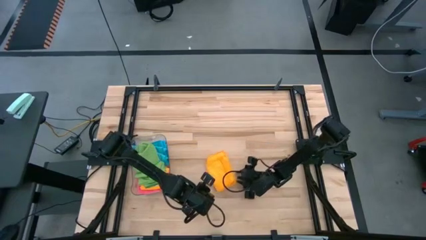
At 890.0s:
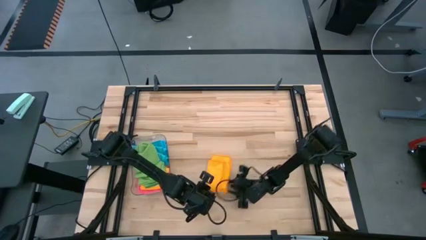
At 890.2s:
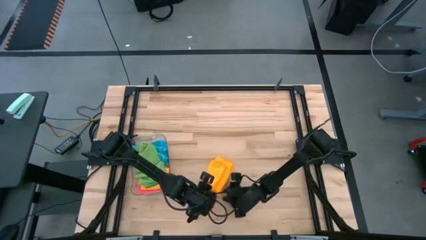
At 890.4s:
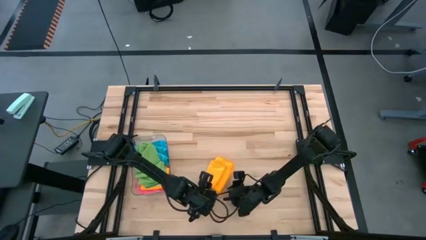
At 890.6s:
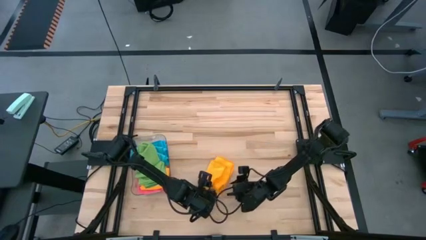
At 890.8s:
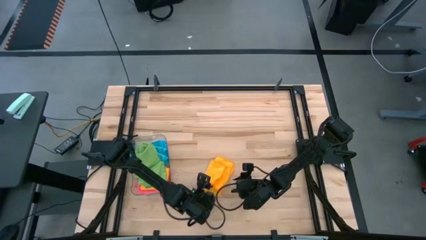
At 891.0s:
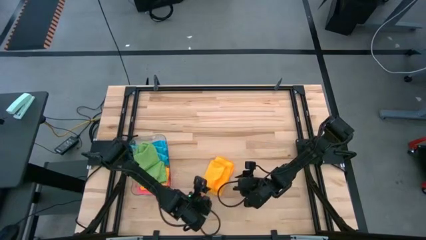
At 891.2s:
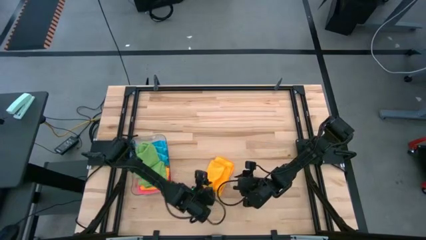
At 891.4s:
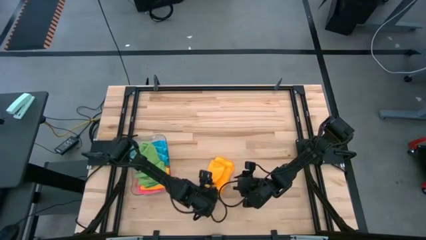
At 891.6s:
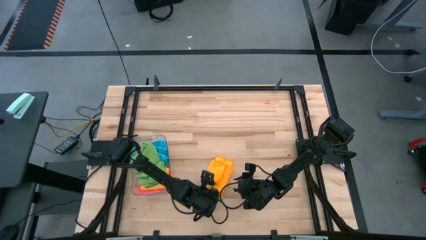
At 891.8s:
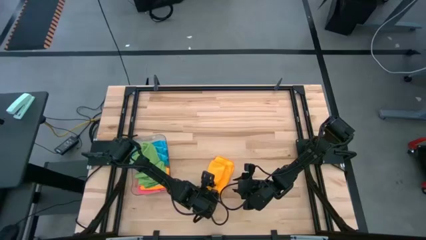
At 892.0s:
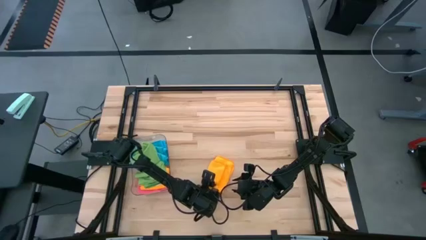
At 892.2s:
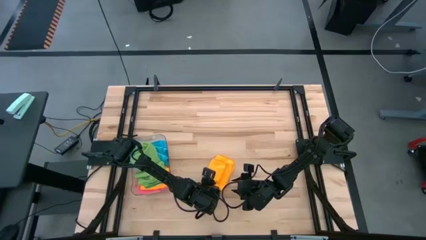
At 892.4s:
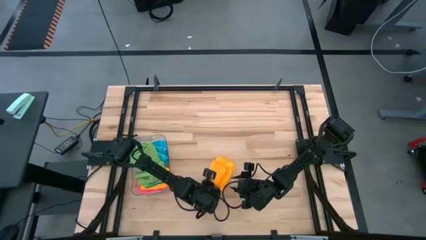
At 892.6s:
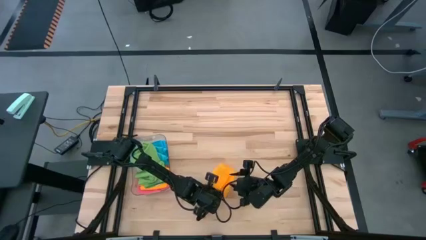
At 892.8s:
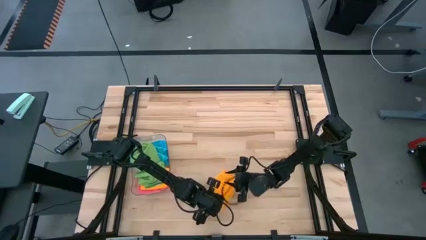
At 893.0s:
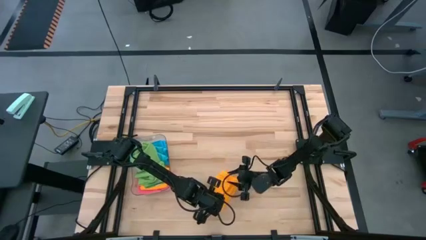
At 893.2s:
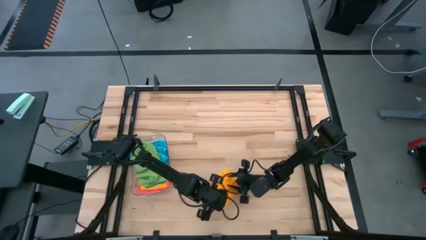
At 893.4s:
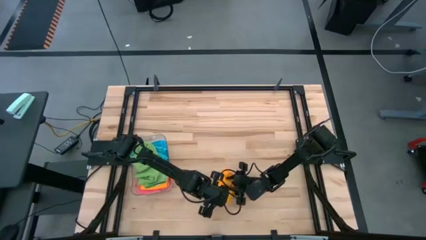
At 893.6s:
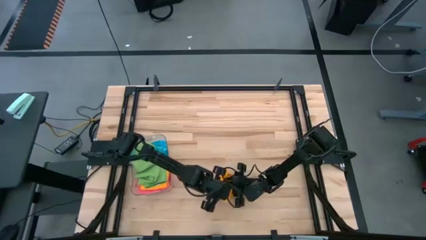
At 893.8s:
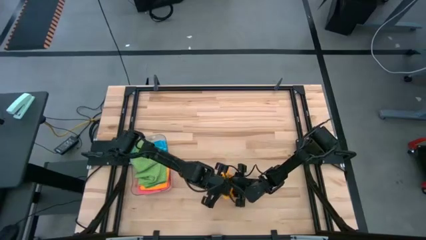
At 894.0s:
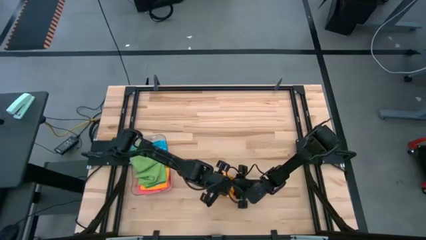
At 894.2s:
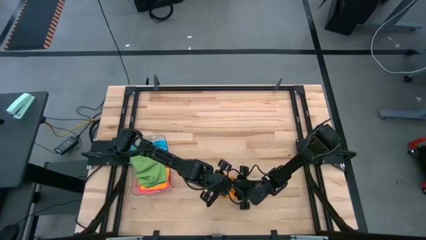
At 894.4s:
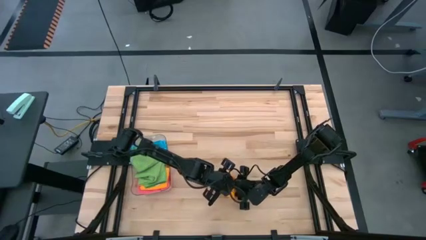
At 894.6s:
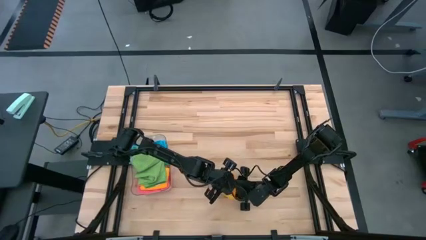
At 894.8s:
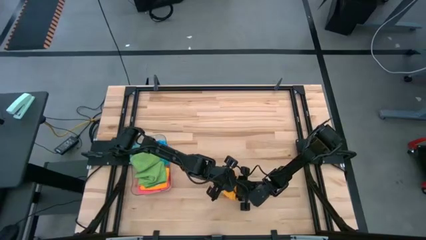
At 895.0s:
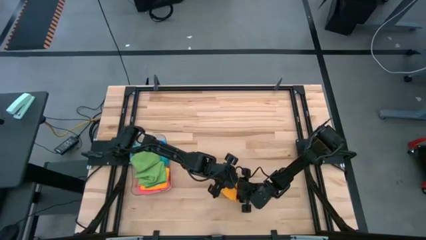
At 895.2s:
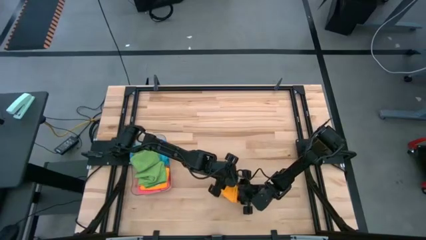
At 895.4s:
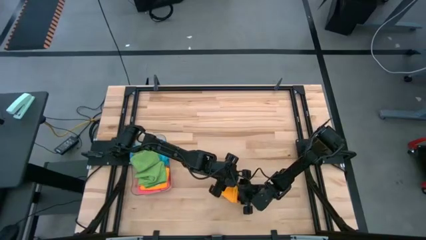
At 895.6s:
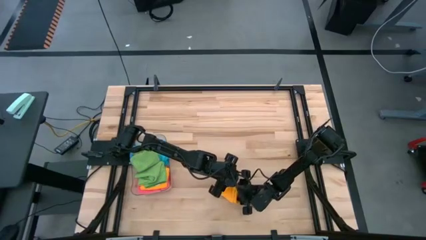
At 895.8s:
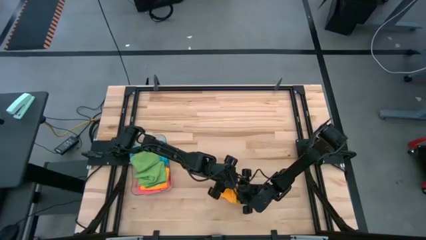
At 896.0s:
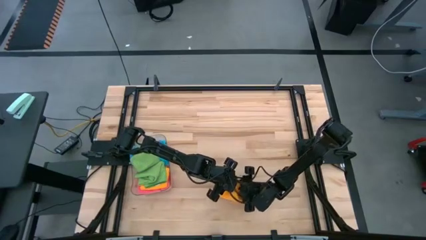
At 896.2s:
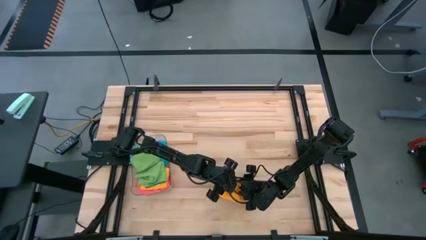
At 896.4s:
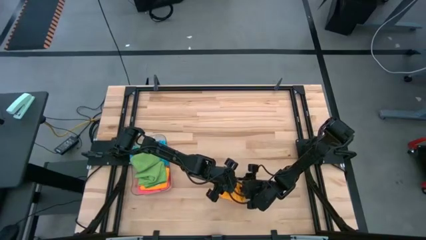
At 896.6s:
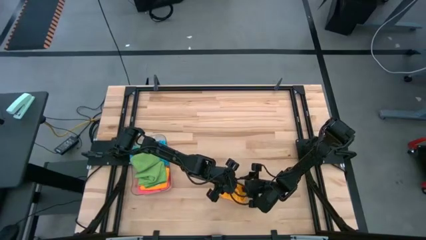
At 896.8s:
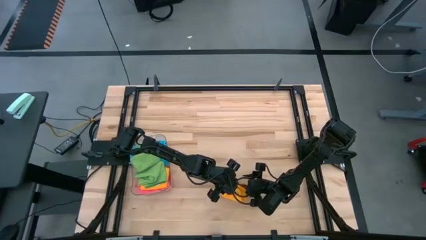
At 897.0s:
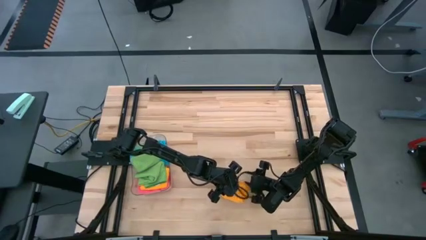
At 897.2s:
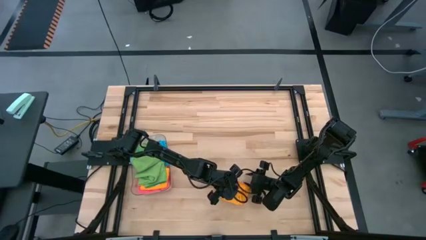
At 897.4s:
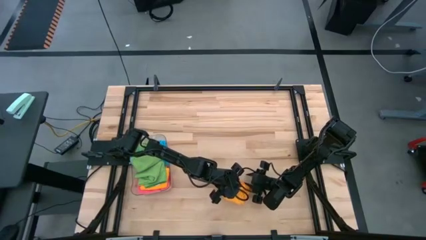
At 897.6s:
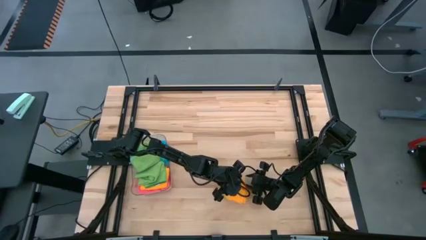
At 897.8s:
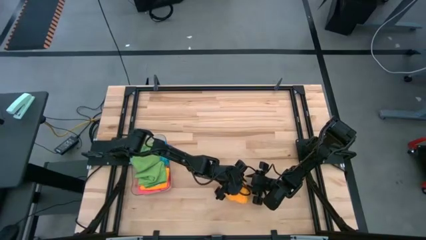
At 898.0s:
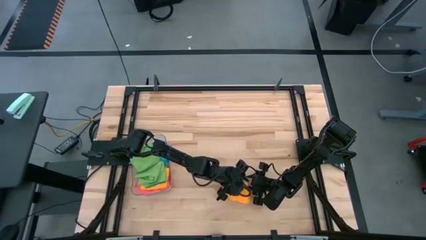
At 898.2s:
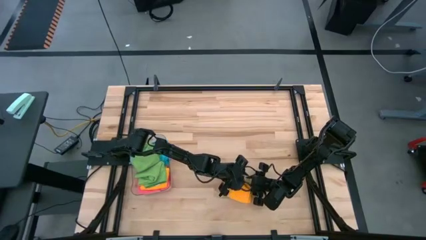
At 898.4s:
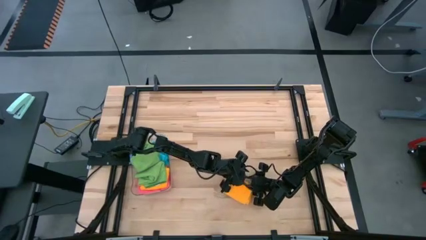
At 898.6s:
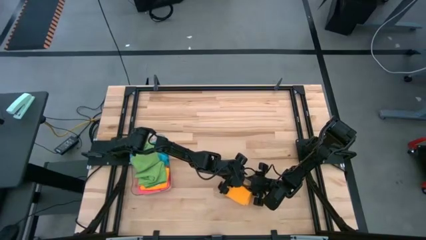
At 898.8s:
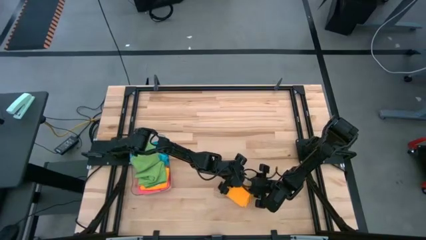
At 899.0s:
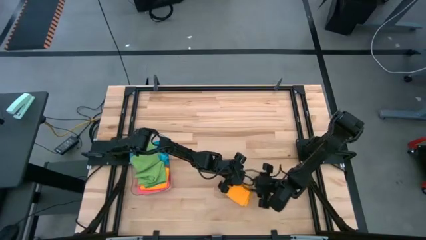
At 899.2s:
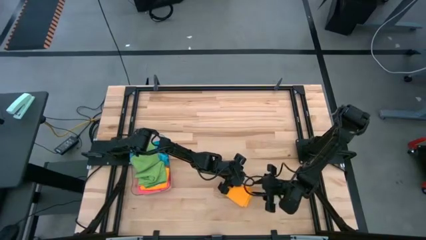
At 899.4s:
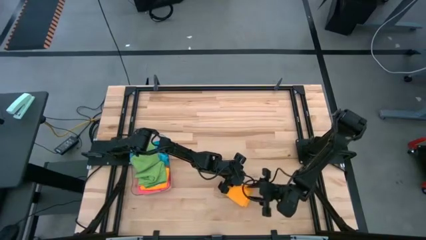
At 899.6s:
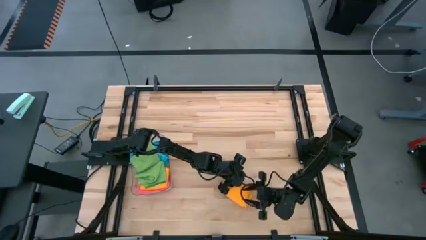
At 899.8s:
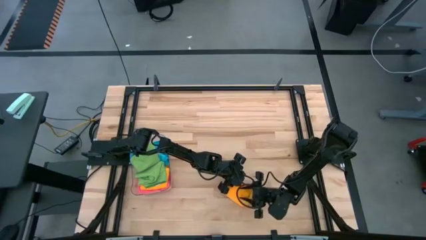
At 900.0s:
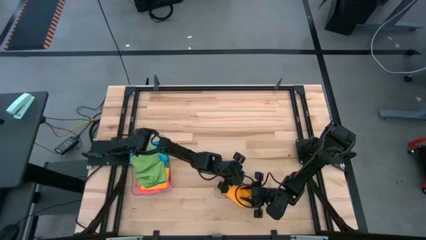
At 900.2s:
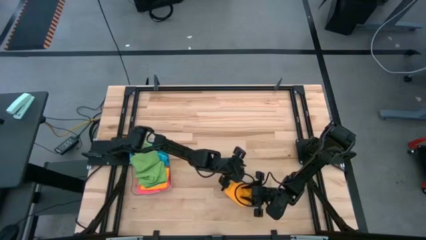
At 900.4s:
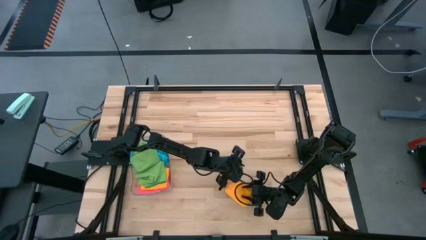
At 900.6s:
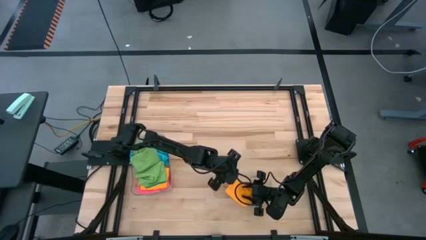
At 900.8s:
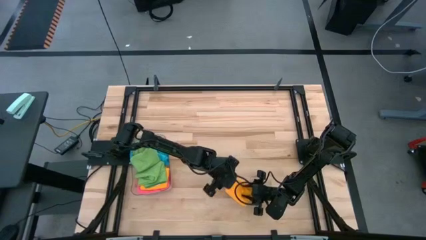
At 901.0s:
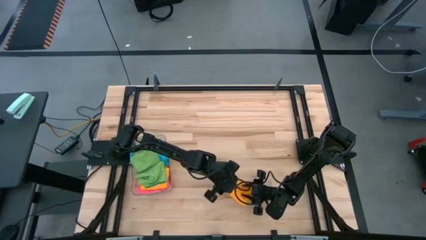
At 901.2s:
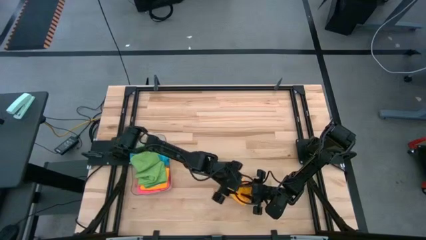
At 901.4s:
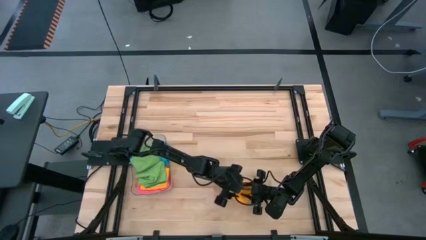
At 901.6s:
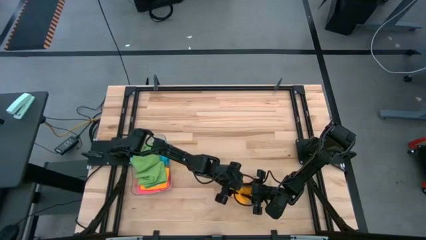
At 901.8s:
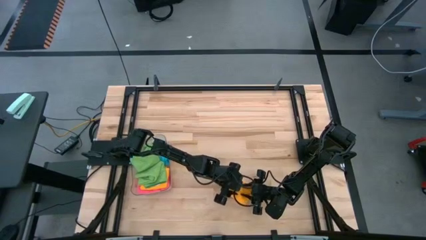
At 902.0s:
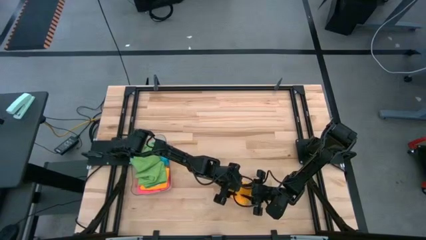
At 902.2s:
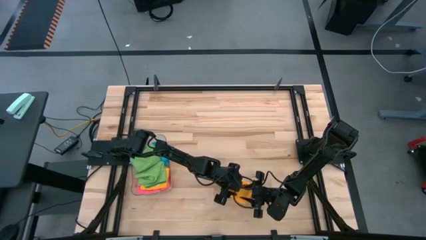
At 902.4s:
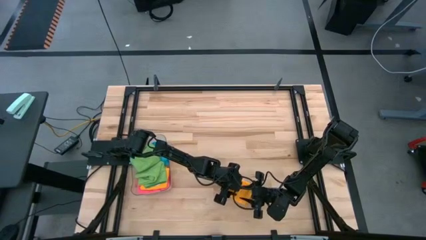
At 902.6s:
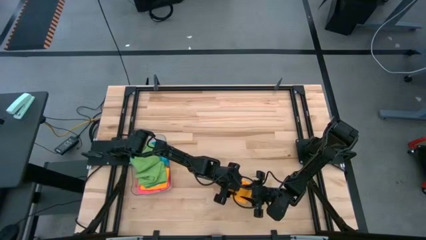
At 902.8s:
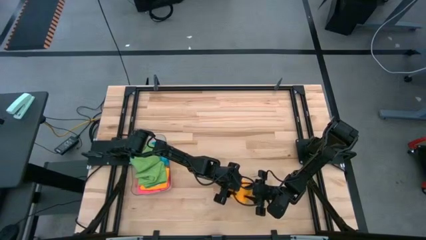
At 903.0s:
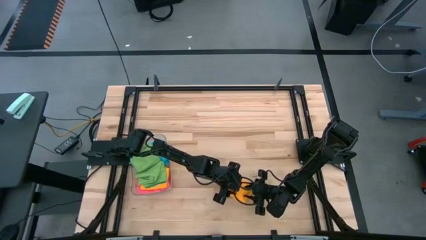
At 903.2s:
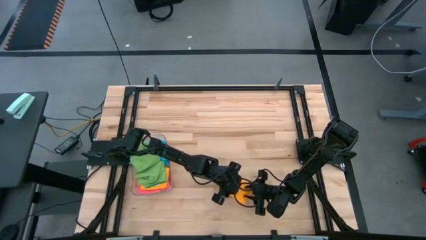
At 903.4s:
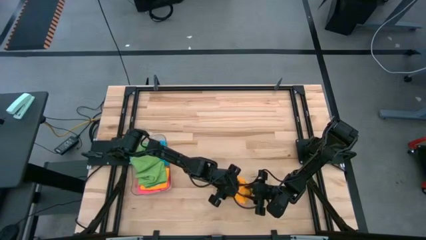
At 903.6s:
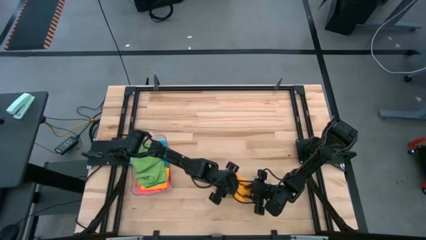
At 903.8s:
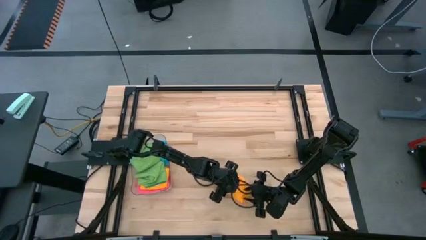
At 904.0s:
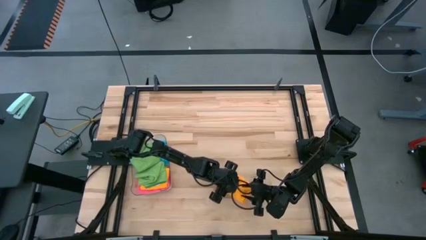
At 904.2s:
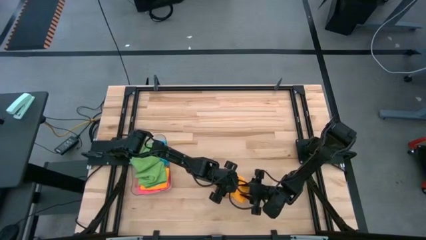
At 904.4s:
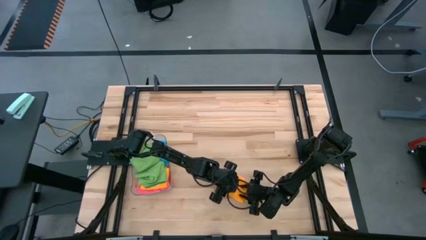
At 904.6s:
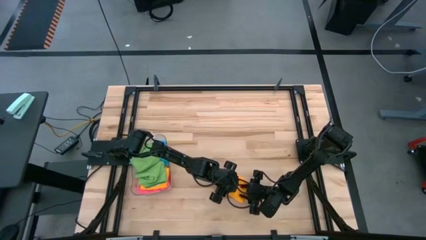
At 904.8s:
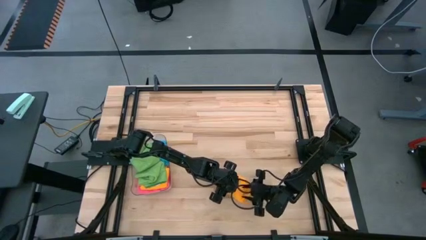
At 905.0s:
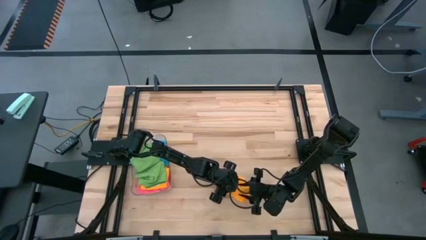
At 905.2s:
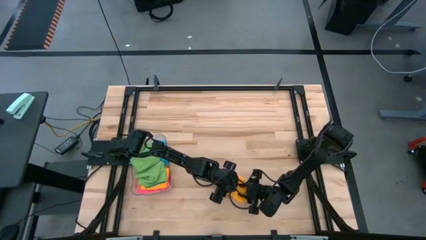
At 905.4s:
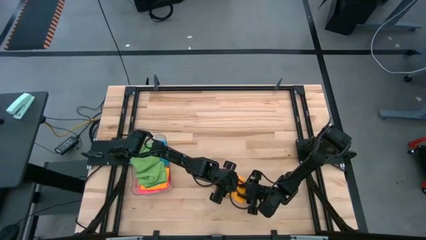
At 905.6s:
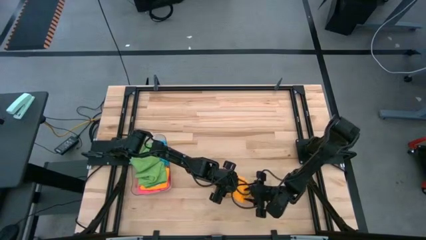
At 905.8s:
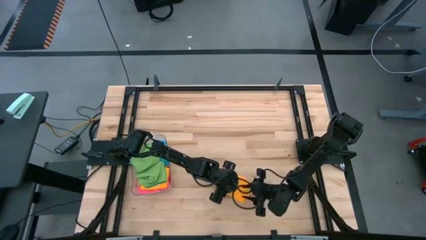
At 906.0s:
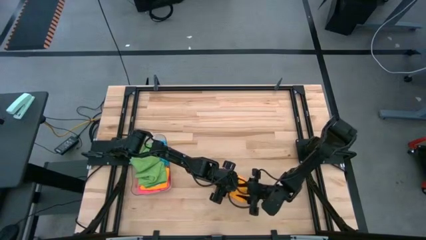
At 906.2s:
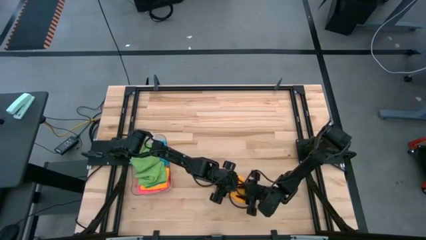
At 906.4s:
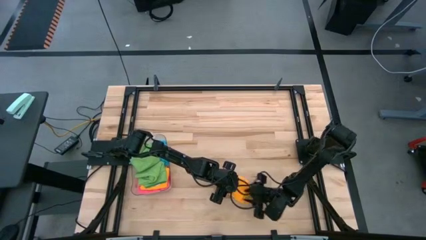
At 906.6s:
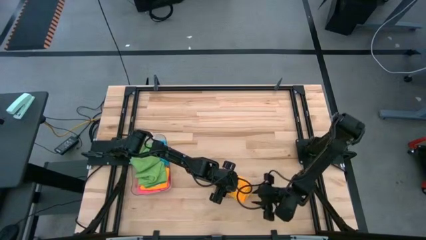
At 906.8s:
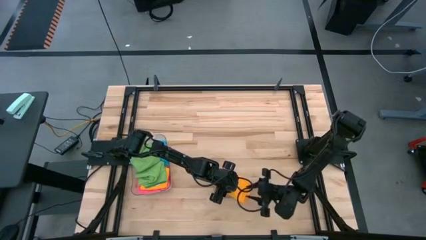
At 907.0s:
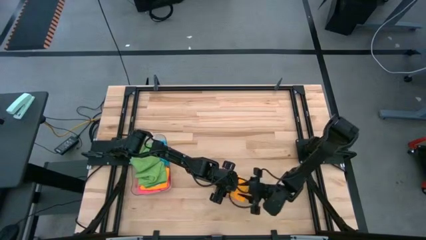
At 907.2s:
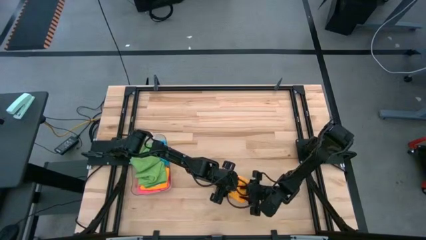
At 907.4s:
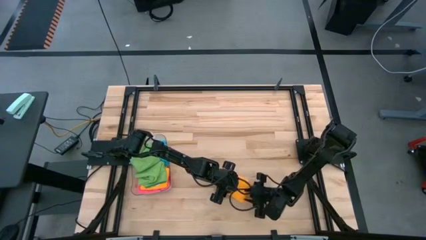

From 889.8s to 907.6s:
Task: Fold microfiber towels
Fold the yellow microfiber cloth
